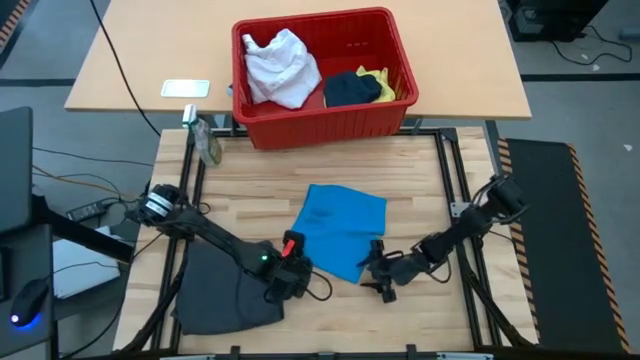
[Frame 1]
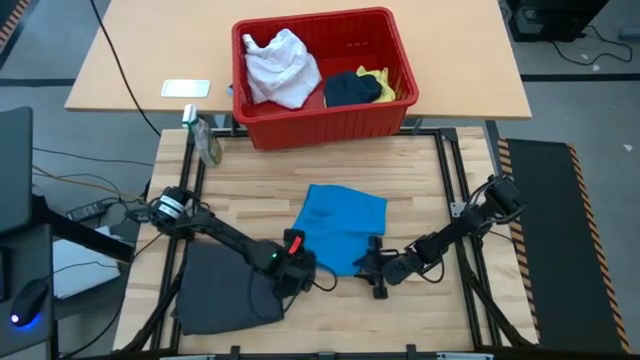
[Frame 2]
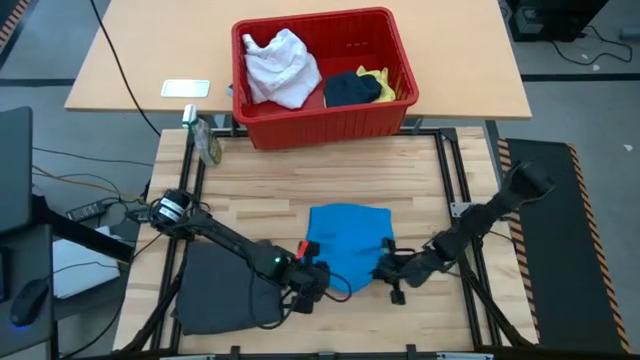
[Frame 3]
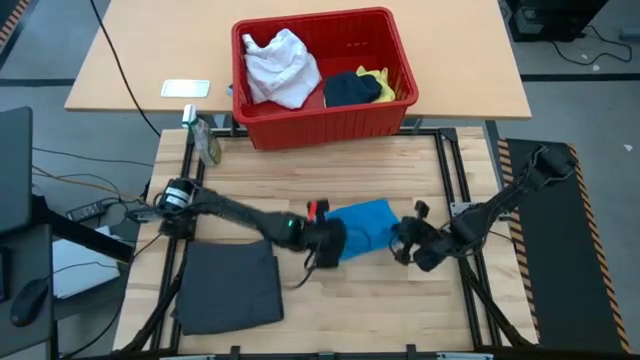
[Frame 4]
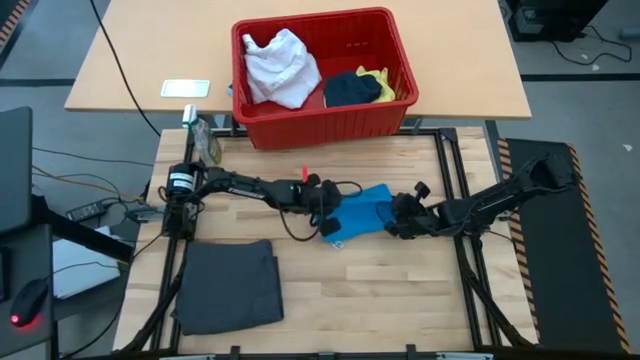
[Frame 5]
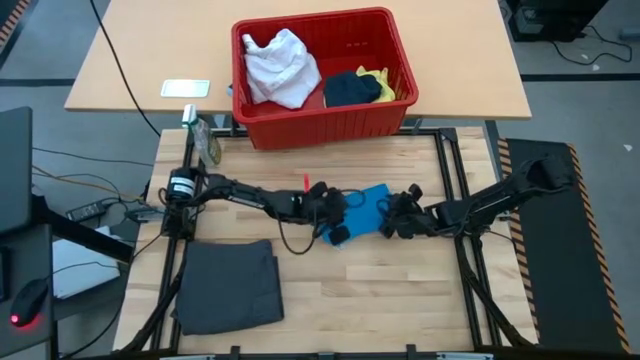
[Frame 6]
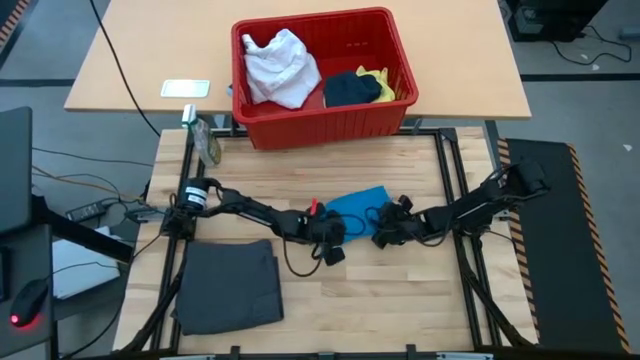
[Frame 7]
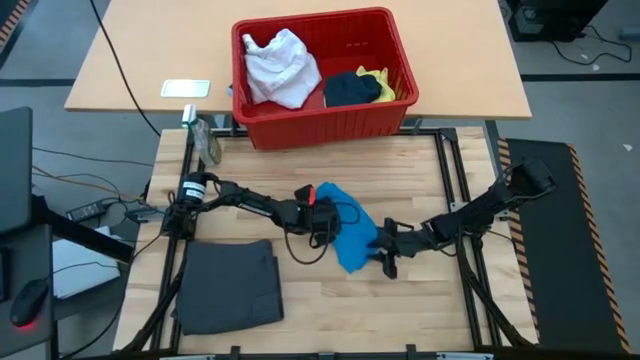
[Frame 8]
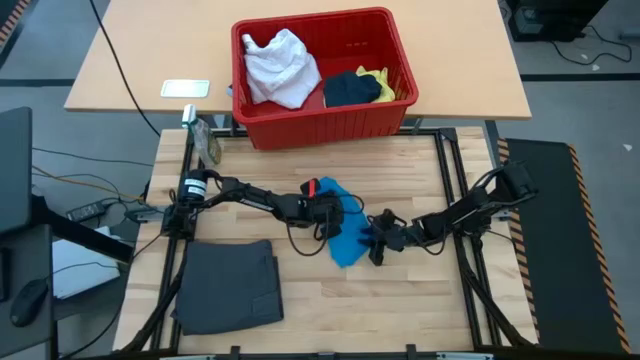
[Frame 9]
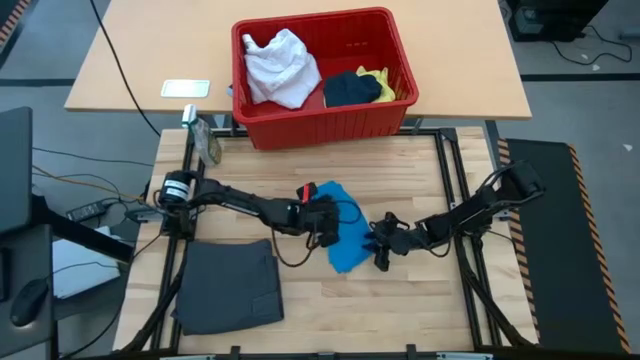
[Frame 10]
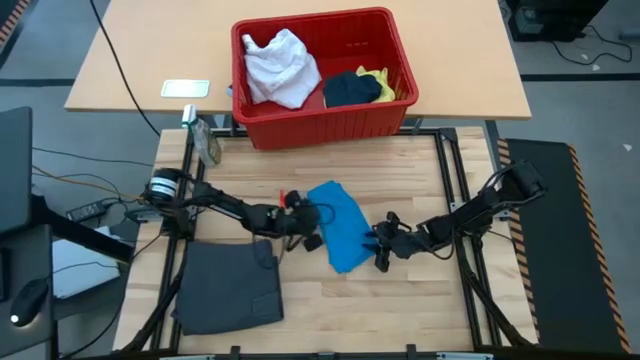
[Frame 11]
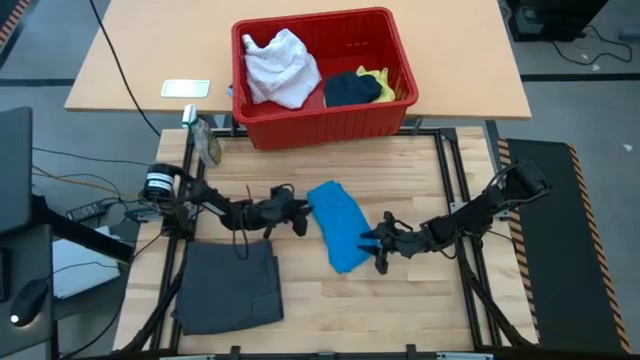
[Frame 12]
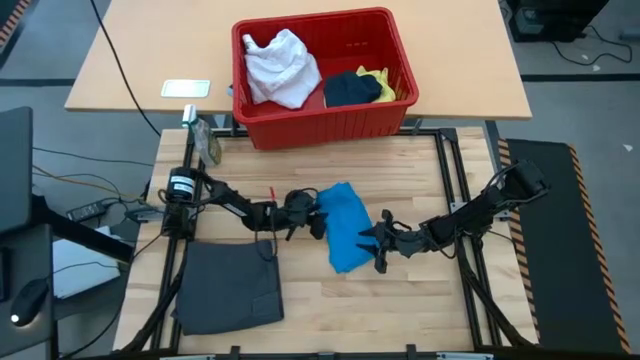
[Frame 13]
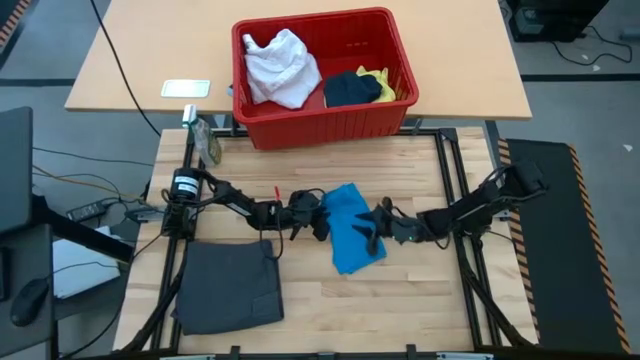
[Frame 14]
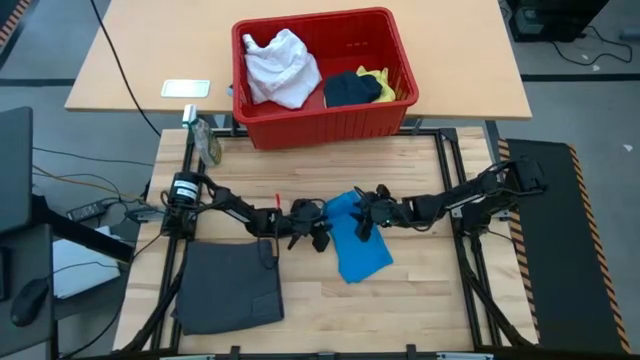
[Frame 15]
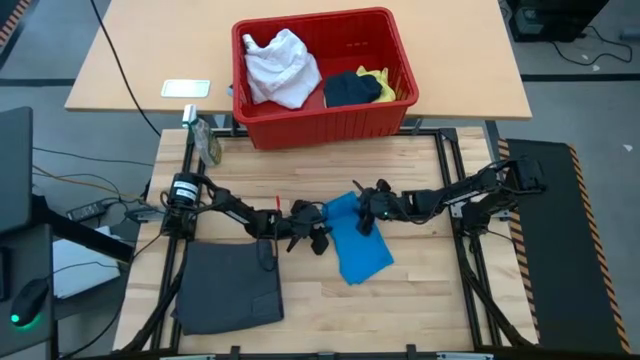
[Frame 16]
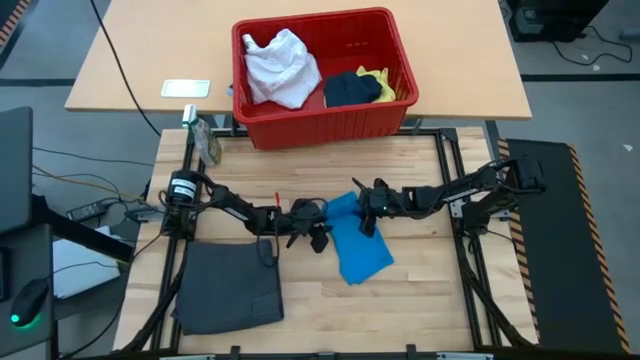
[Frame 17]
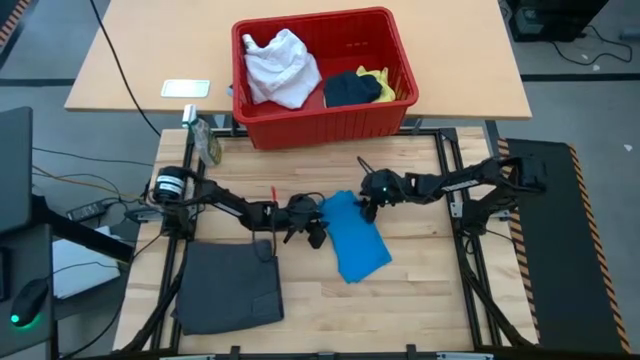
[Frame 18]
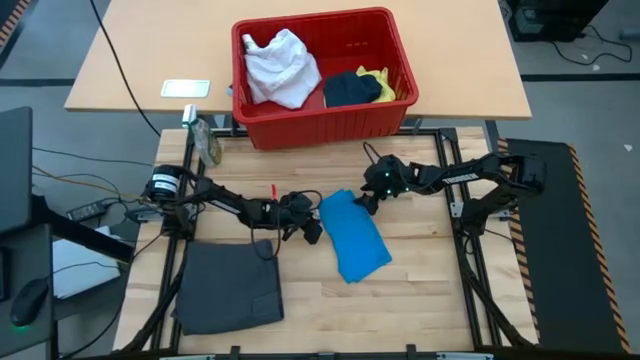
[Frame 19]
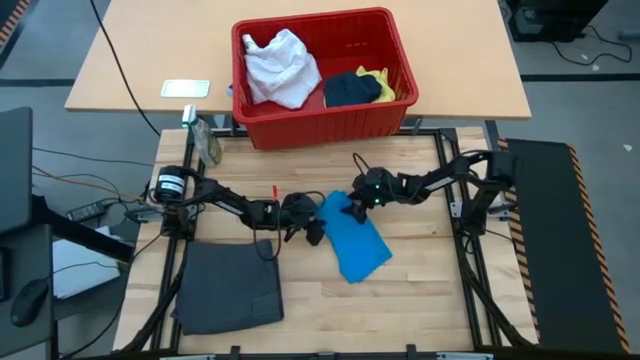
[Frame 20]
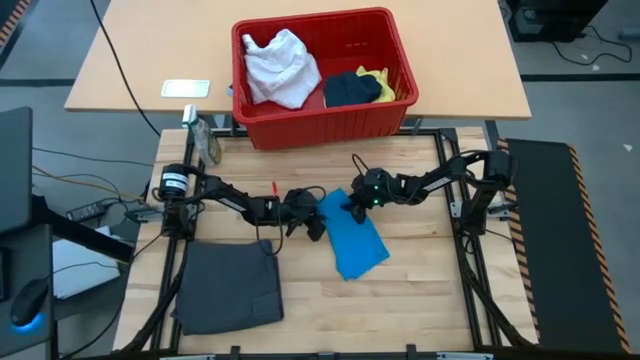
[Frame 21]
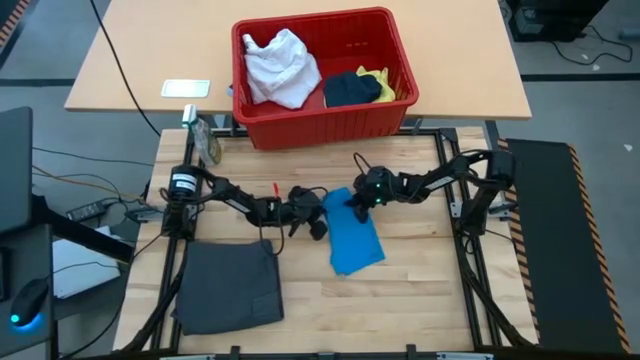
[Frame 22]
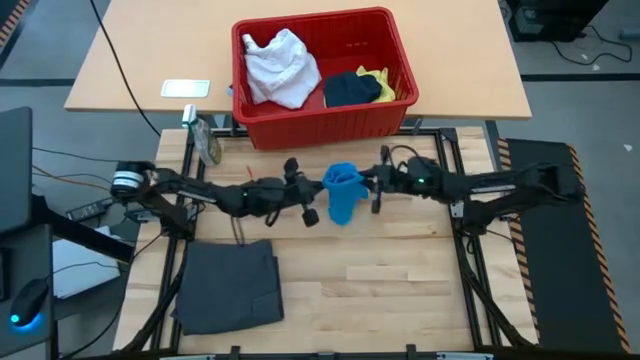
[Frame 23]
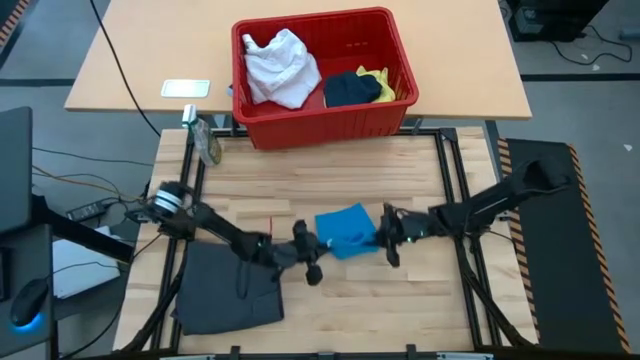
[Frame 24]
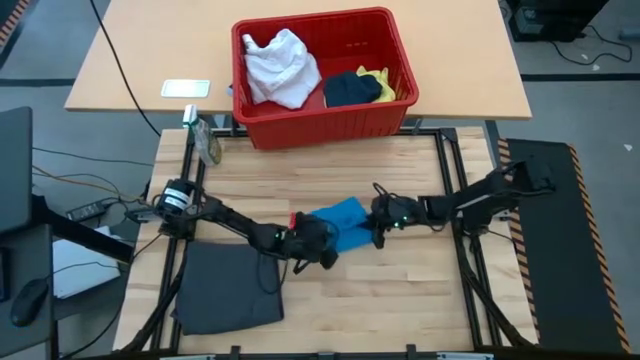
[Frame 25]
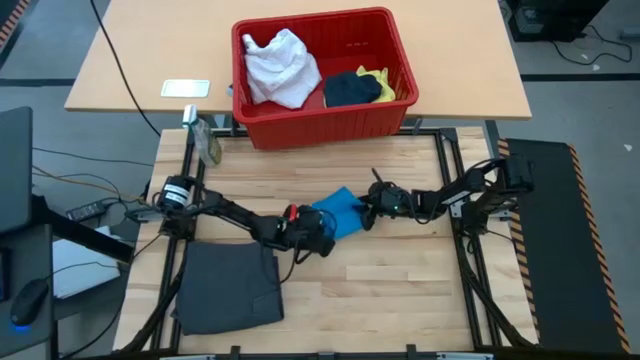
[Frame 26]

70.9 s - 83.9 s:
Task: Fold laundry
Fold the light blue shorts

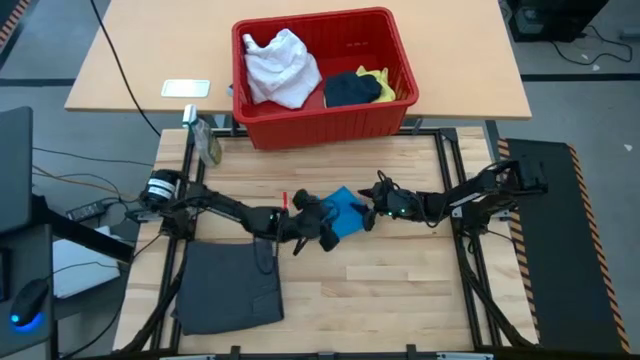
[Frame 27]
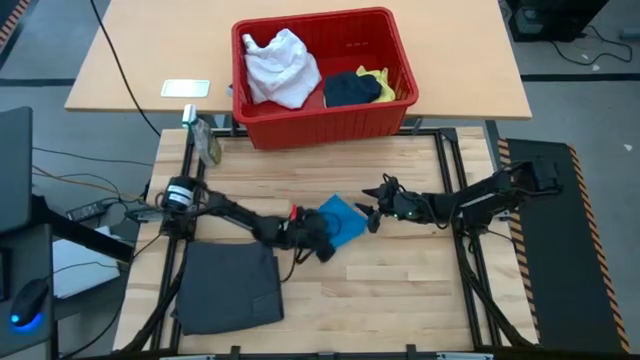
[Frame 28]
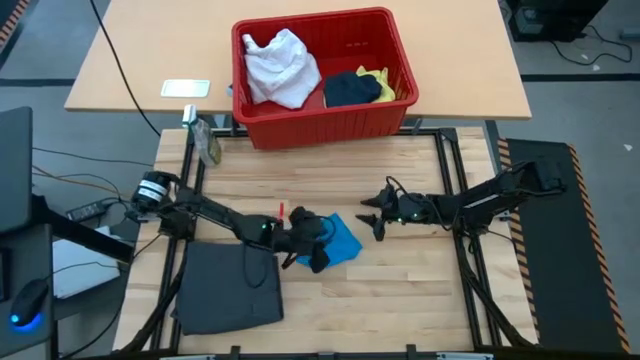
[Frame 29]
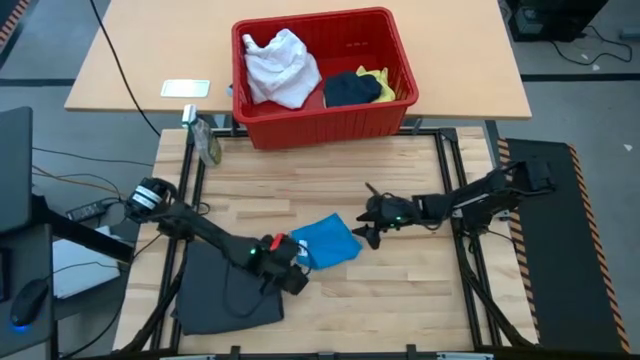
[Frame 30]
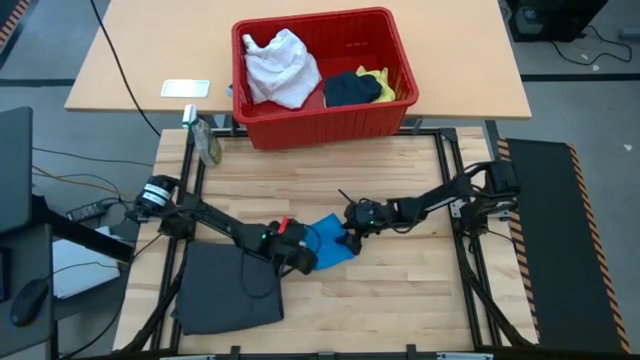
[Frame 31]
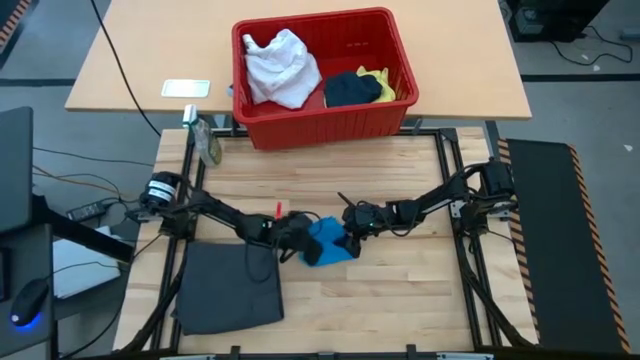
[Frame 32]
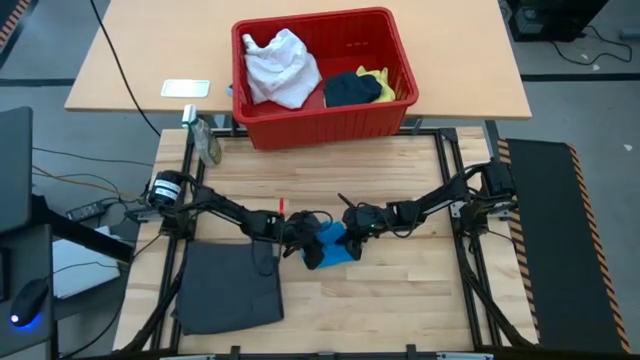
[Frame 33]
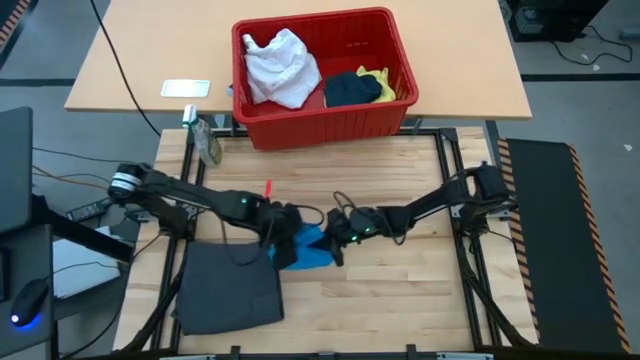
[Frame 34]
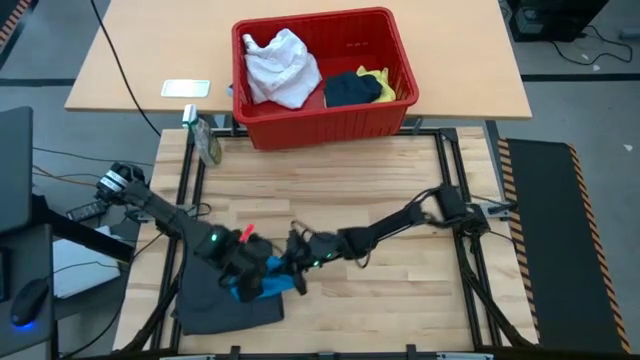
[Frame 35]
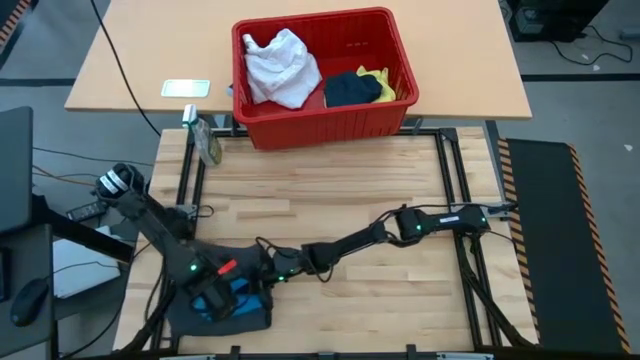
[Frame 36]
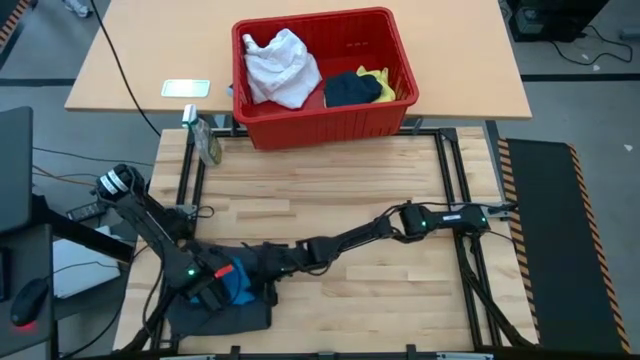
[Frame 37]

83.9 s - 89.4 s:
Stack the light blue shorts on top of the black shorts

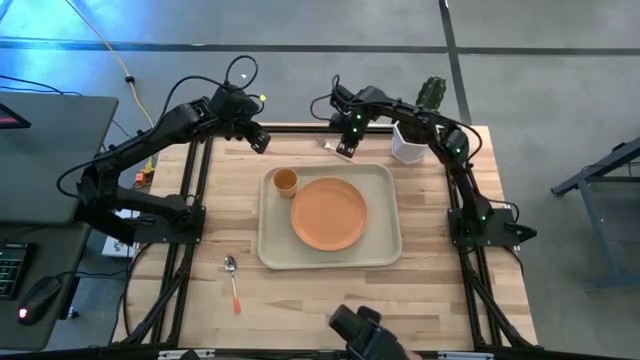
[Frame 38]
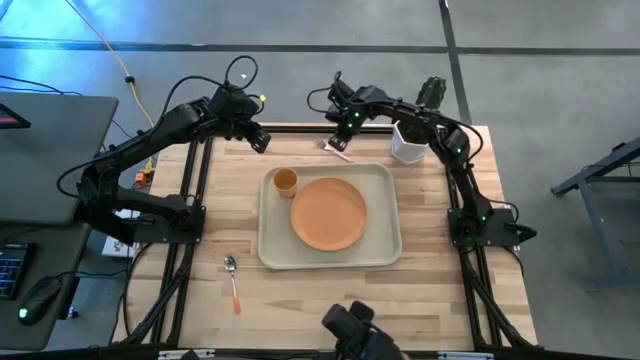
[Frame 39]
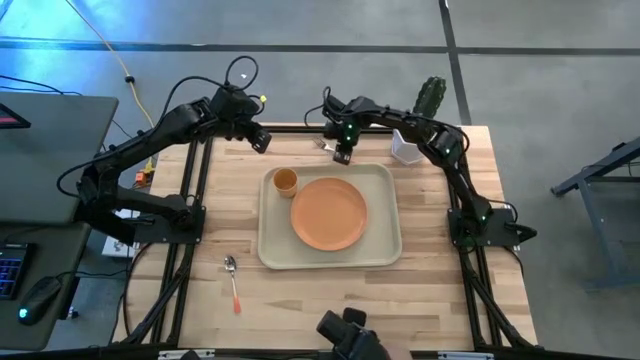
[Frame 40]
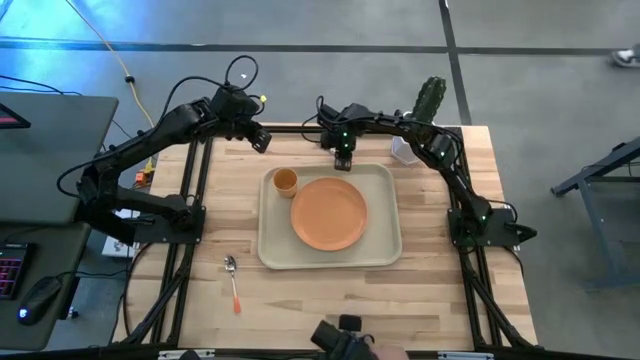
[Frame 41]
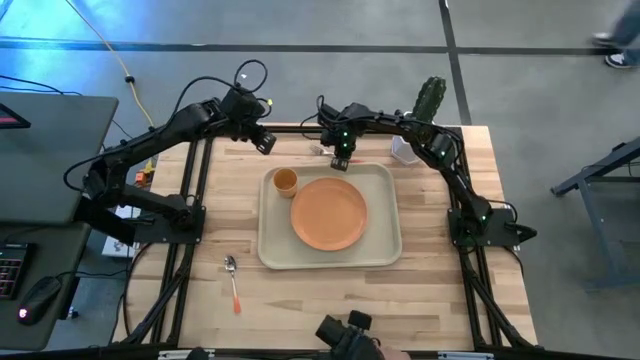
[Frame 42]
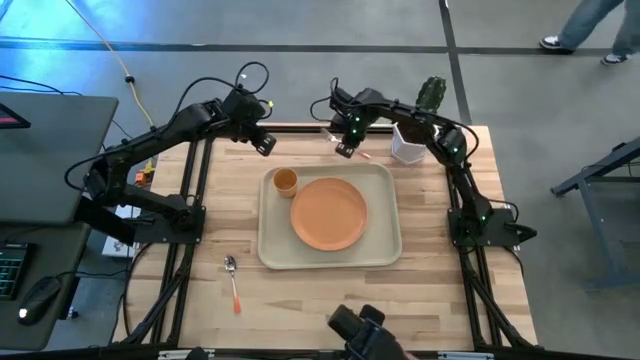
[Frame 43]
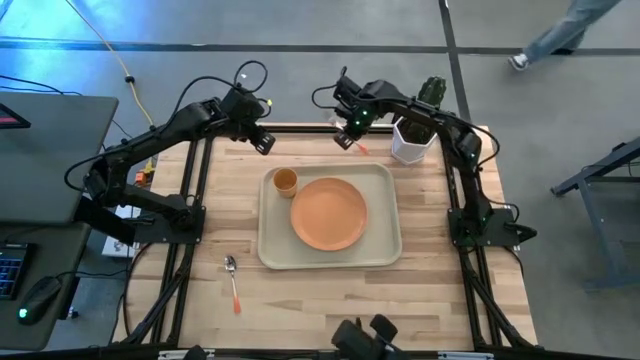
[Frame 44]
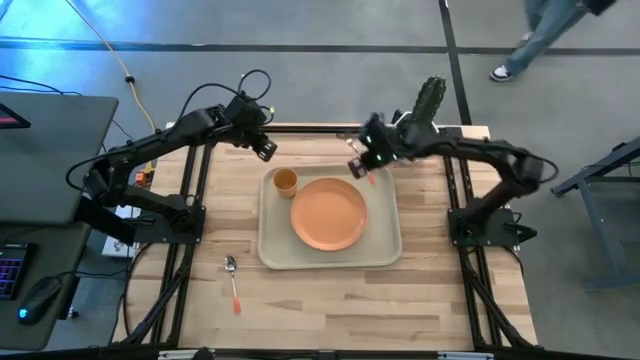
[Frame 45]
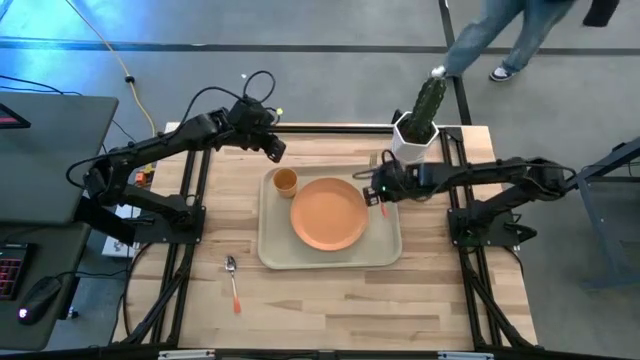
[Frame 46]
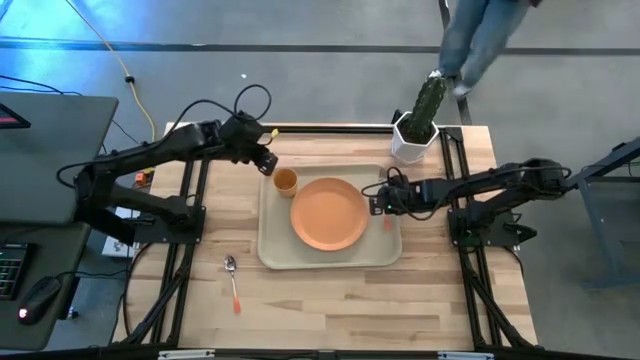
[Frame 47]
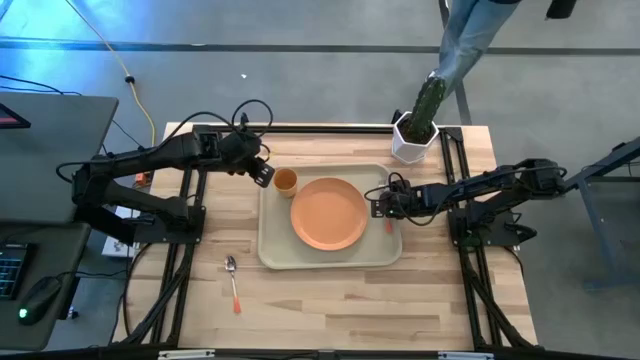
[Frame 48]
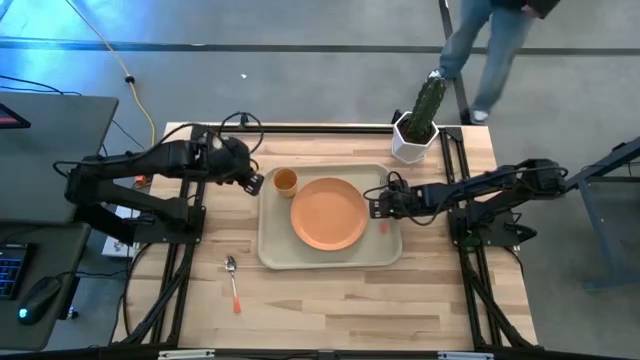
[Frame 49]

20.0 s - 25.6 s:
Task: Pick and place plate/cup/fork/spoon on tray
Put the orange fork on the off white tray on the left side of the orange plate
